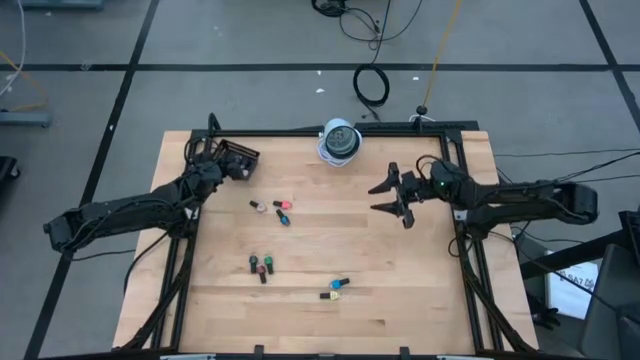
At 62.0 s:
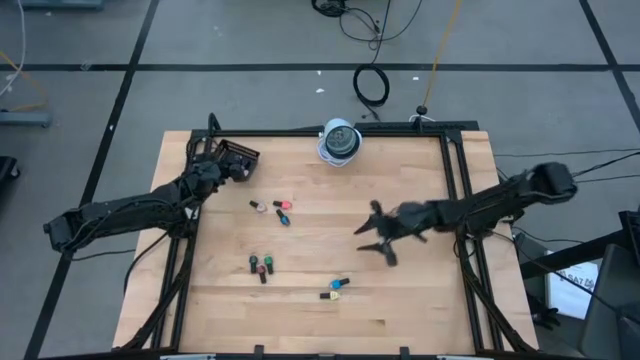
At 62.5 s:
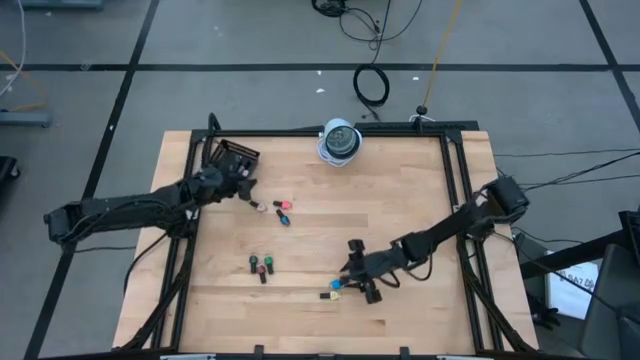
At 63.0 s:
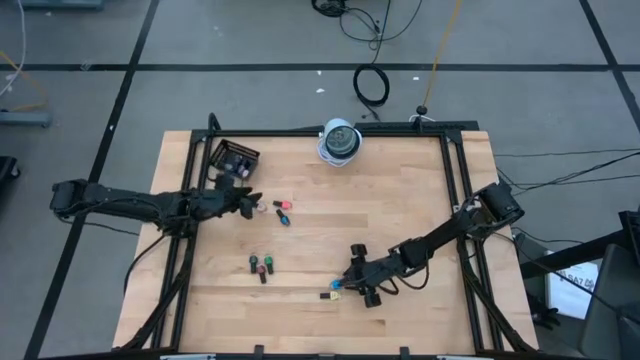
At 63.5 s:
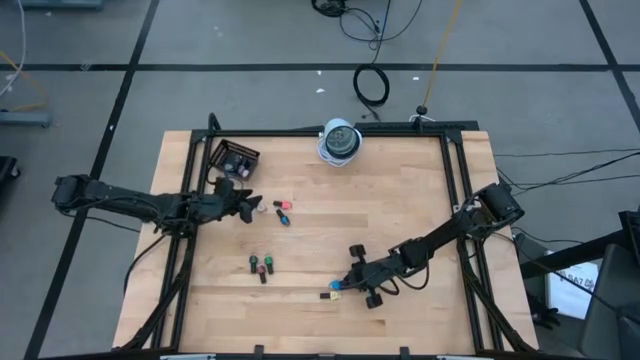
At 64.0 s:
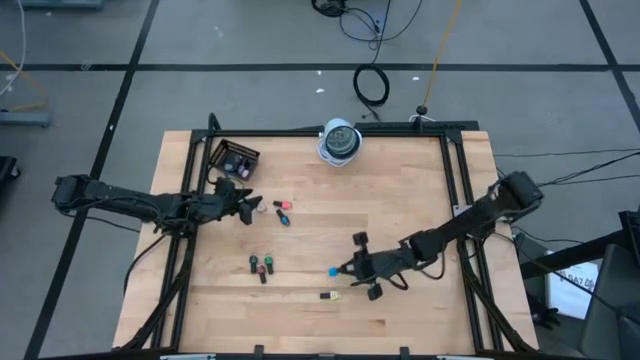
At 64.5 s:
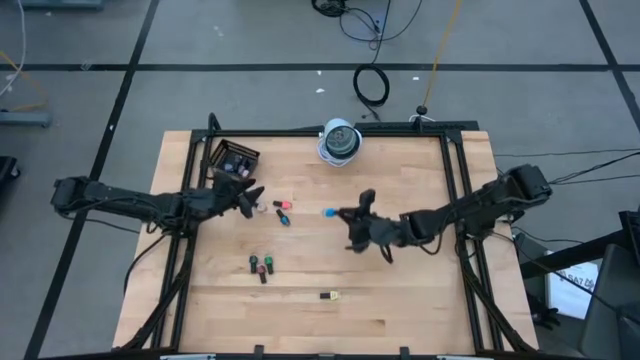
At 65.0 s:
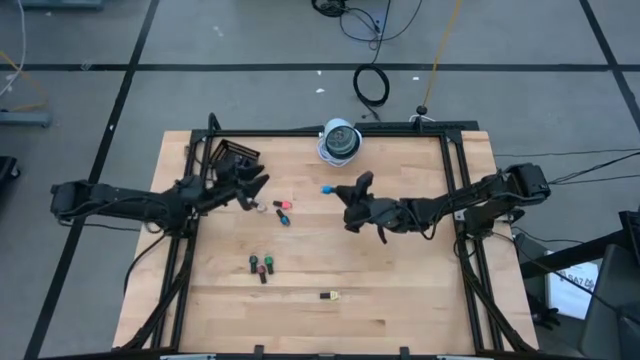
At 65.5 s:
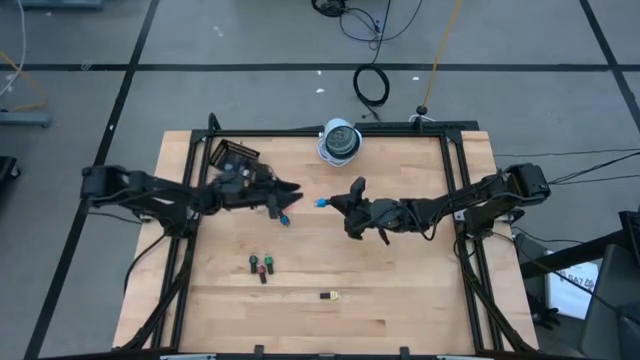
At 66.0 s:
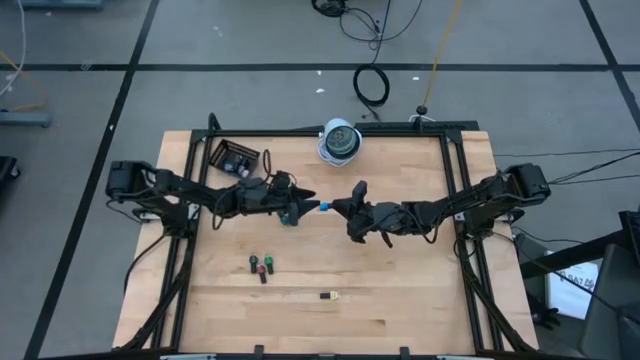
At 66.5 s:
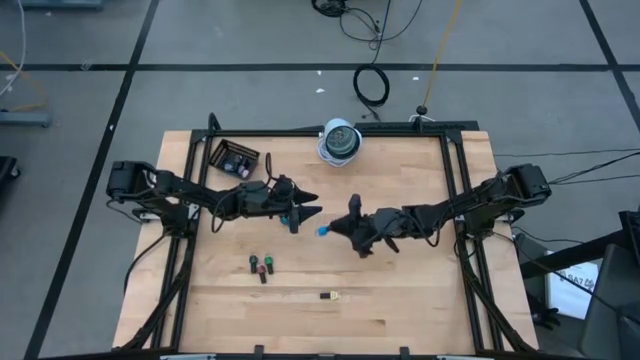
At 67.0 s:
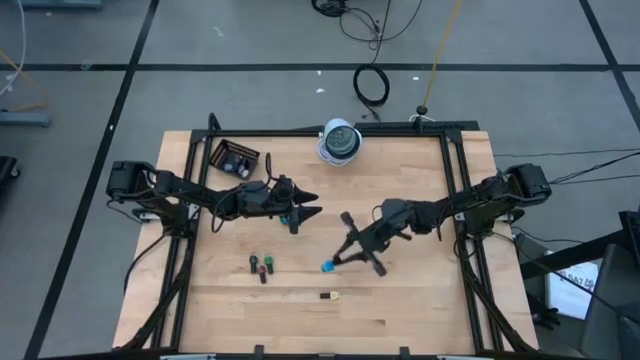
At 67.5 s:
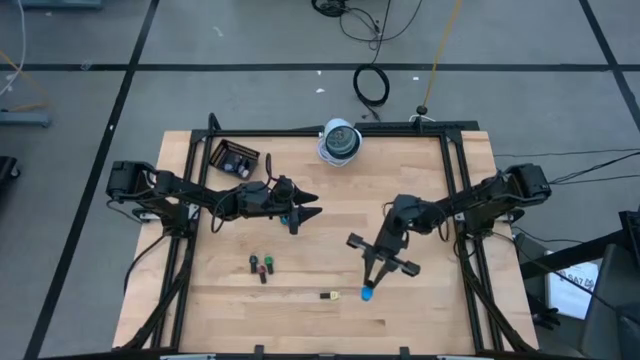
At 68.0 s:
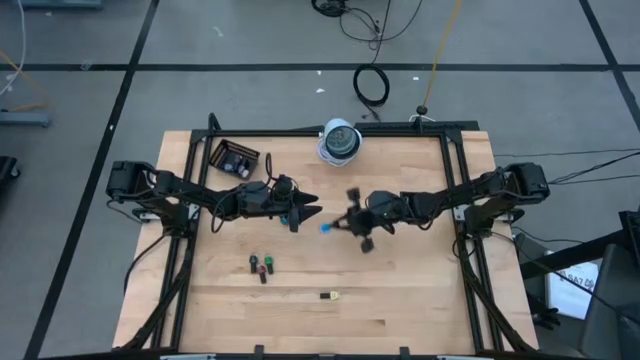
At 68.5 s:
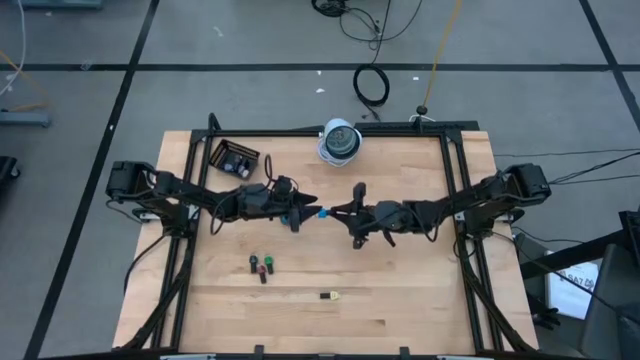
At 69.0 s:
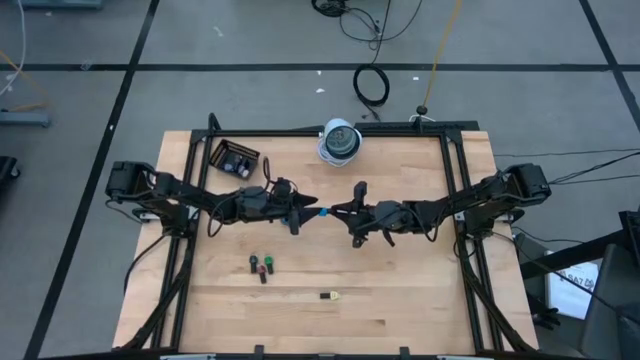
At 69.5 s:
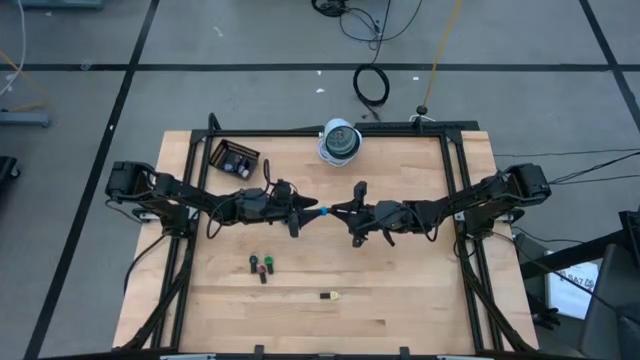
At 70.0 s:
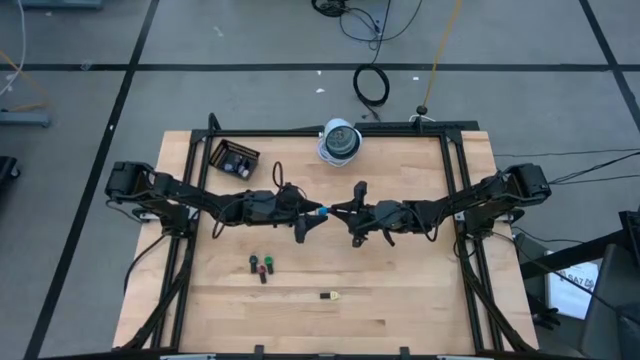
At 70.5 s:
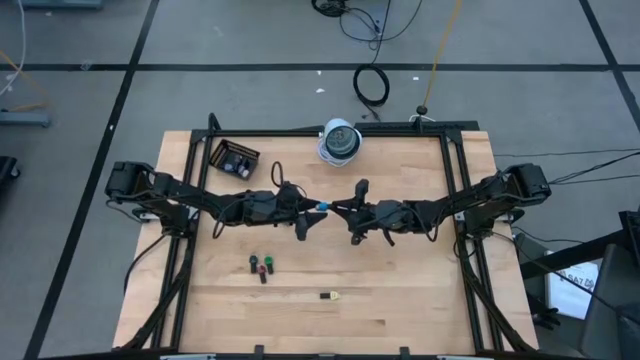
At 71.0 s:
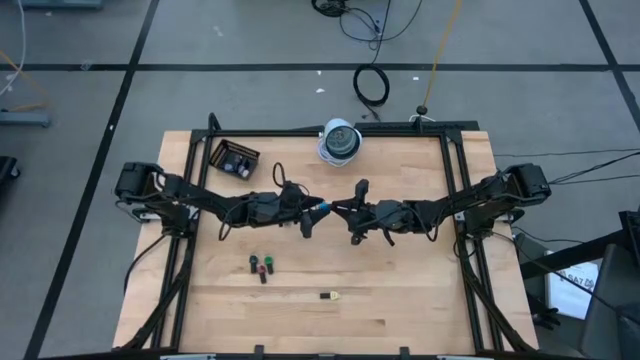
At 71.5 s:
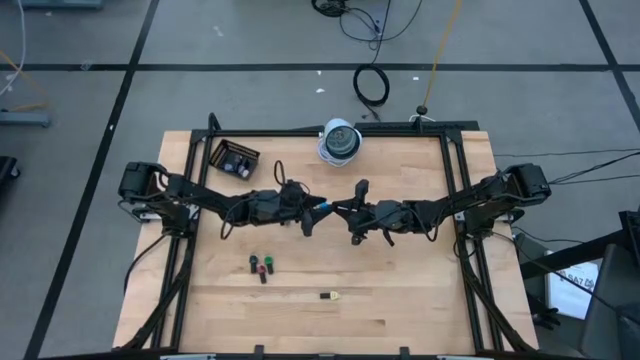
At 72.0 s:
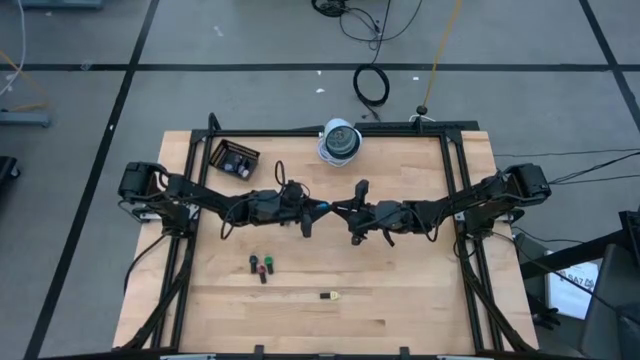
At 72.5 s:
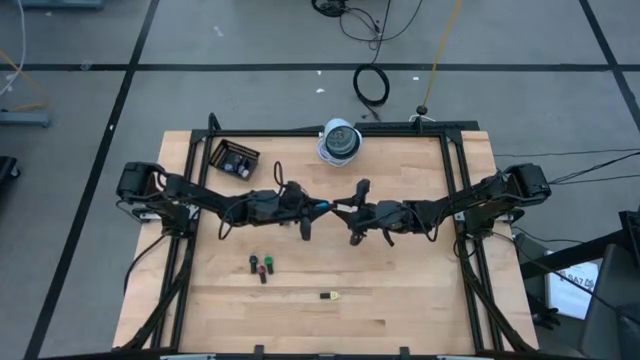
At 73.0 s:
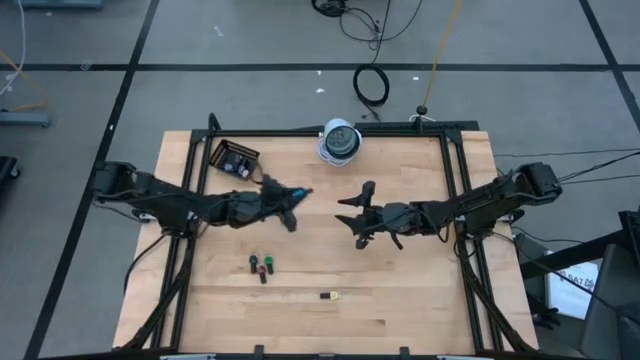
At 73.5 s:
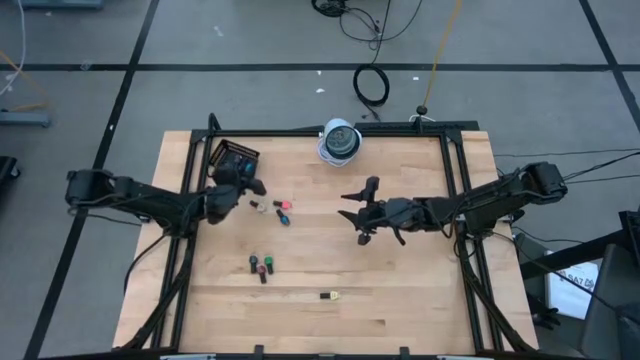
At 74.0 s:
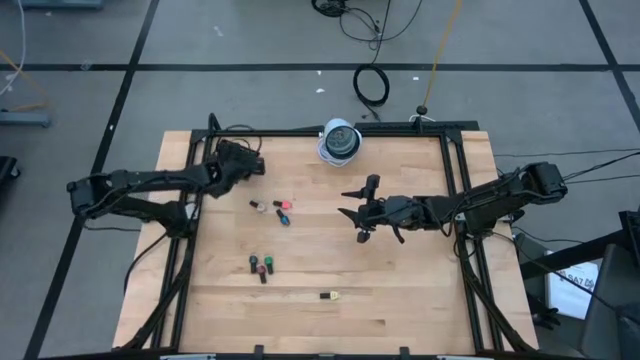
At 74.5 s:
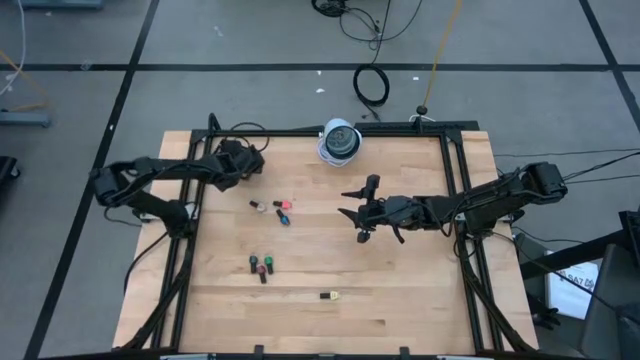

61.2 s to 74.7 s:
Task: Pick & Place Nail Polish
Put the blue nail polish bottle into the black basket

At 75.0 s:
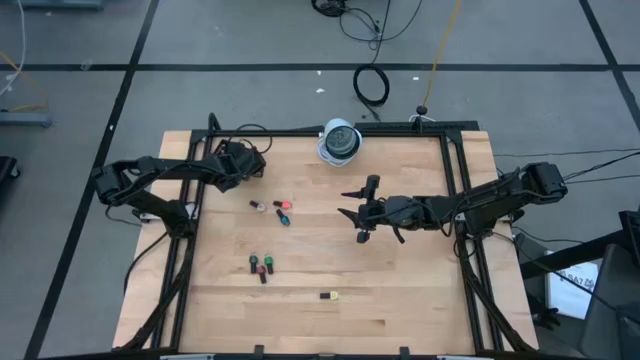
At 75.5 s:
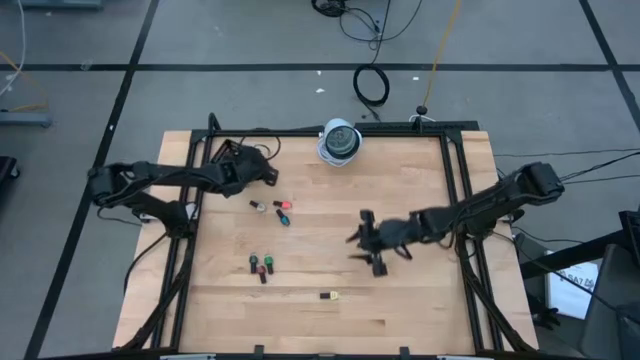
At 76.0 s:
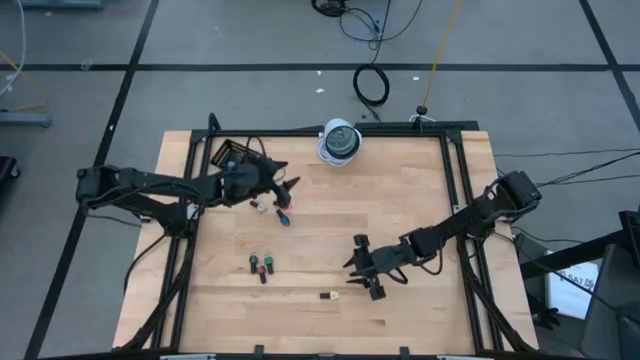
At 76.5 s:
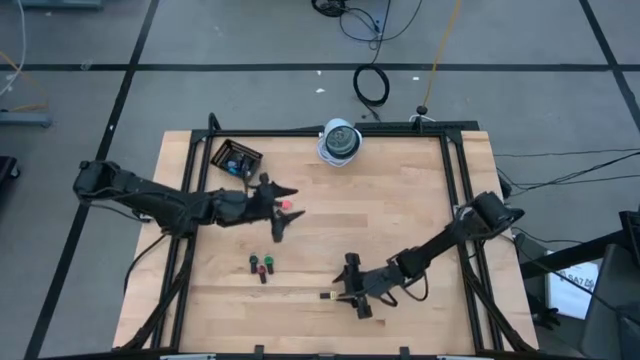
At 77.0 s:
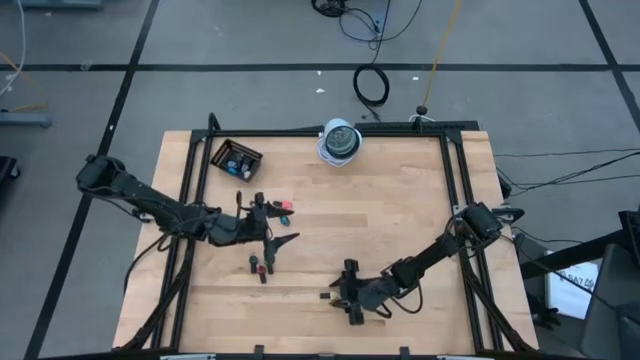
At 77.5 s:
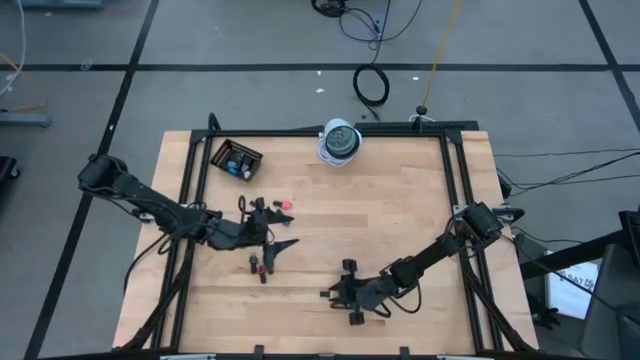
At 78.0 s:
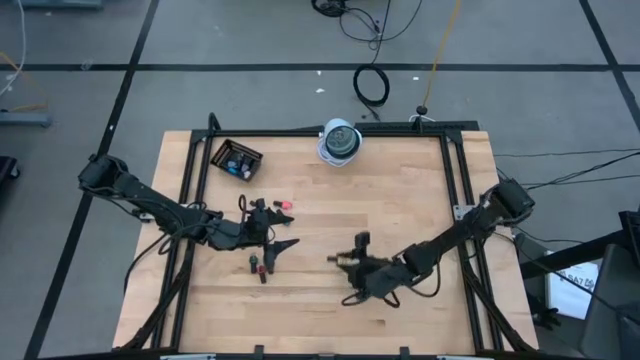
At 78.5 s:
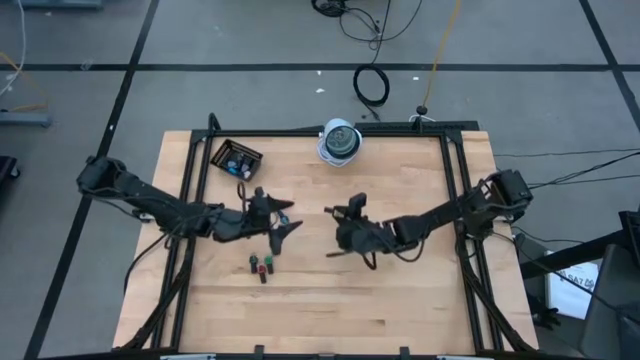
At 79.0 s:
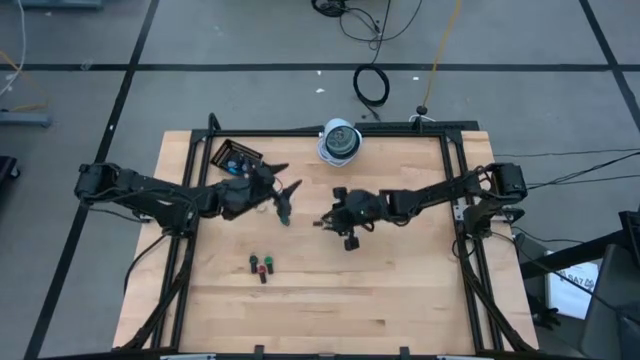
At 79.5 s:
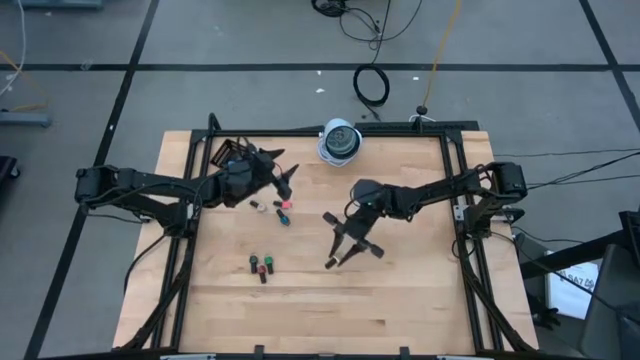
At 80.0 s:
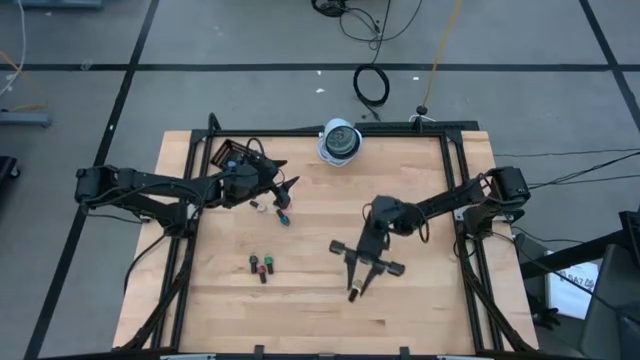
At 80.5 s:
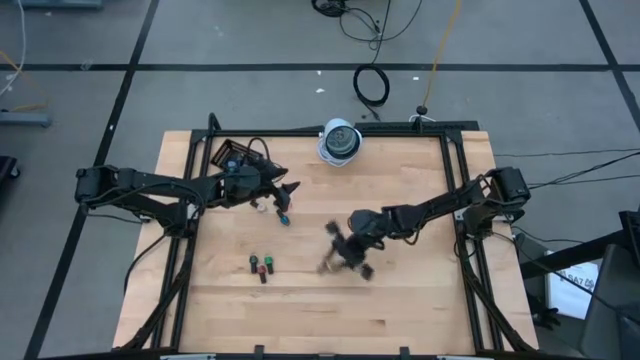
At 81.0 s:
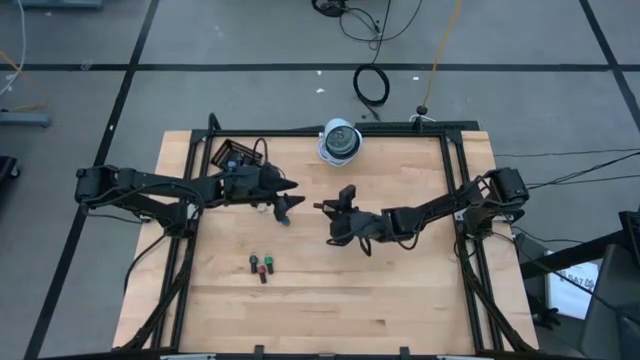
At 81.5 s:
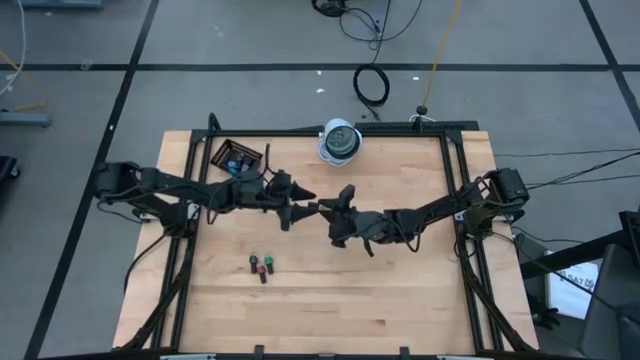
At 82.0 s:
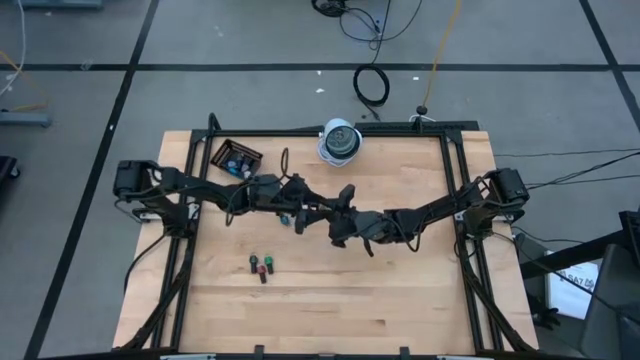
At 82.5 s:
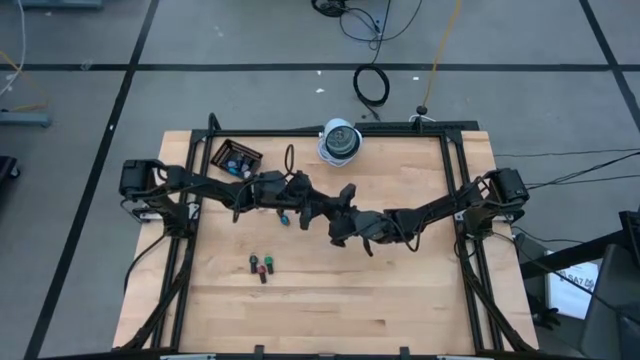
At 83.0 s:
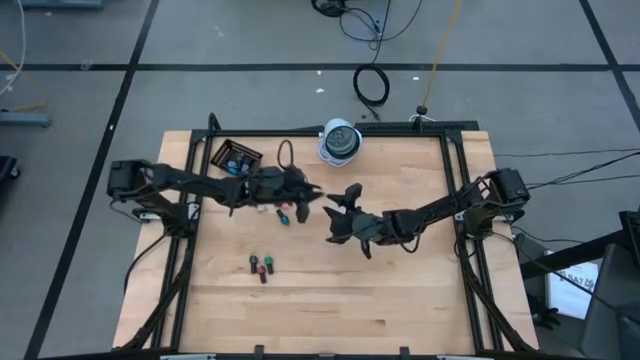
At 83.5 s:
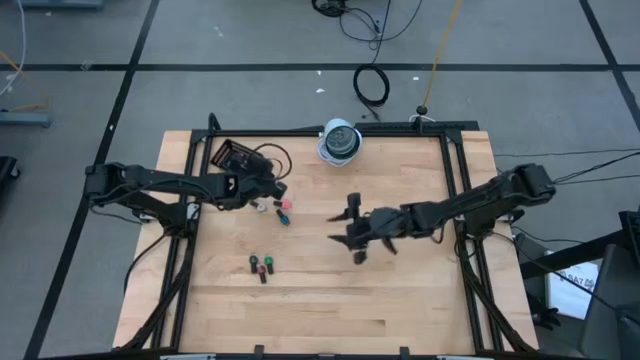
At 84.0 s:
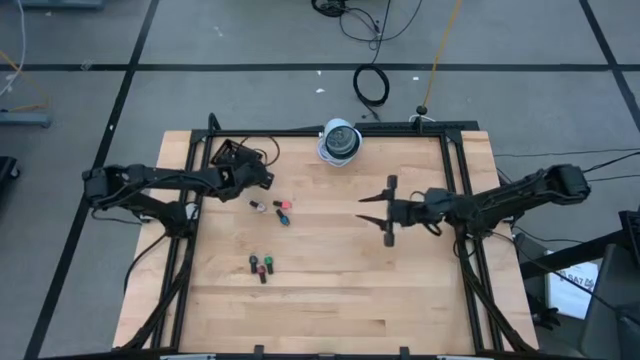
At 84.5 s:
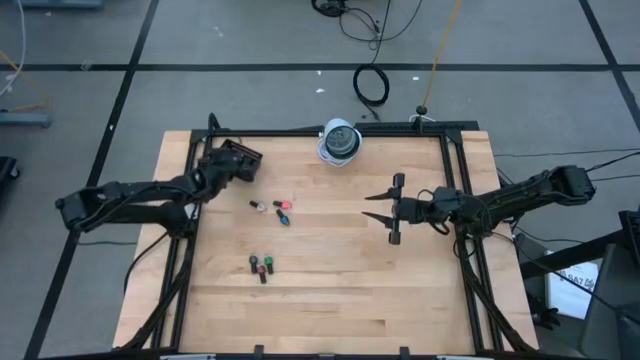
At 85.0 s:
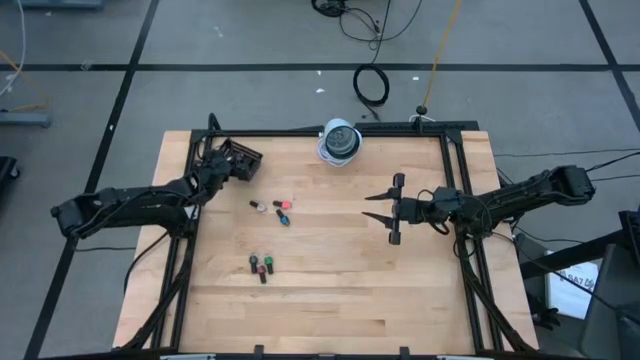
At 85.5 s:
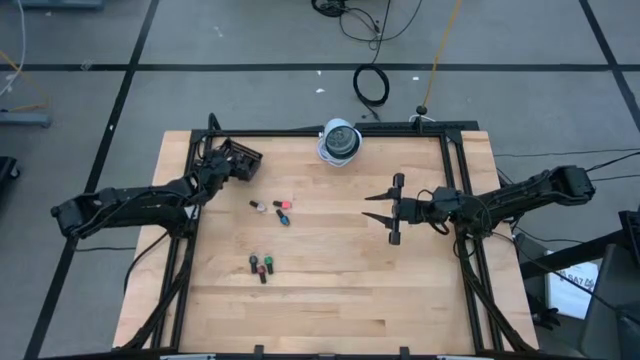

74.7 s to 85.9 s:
Put the yellow nail polish bottle into the black basket
